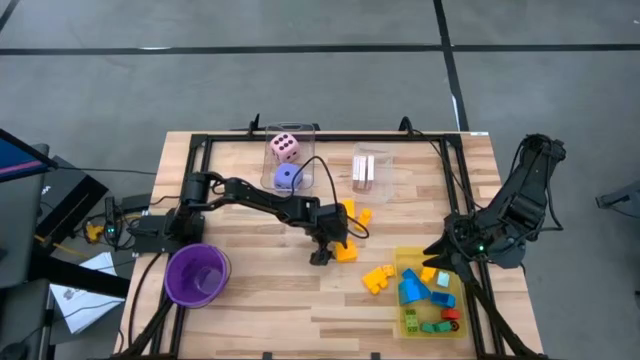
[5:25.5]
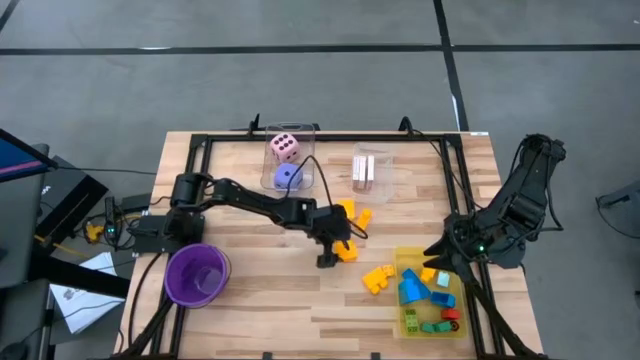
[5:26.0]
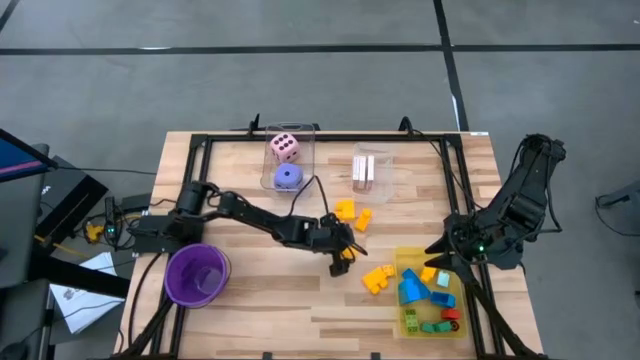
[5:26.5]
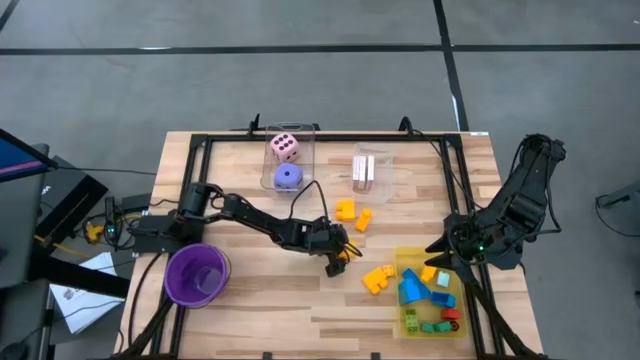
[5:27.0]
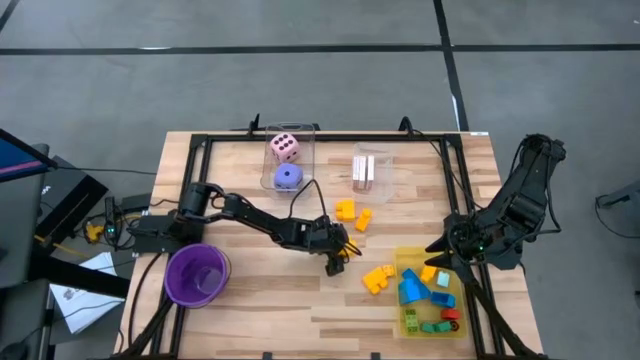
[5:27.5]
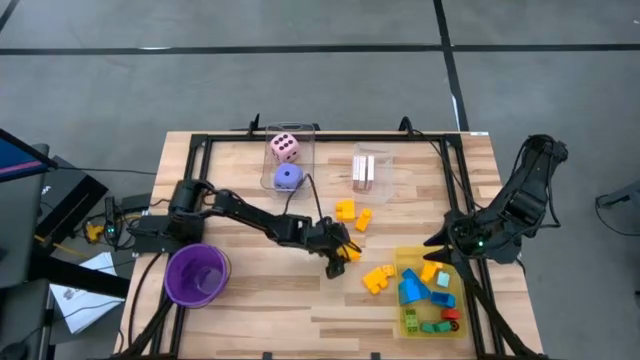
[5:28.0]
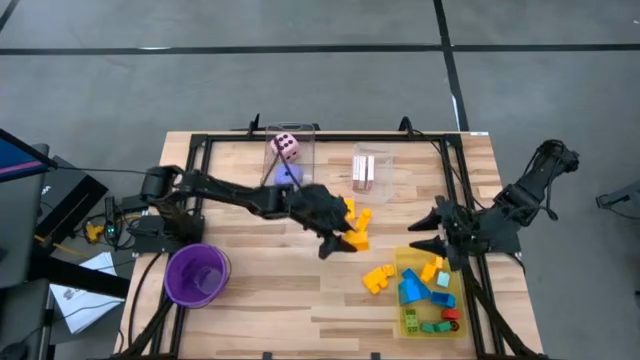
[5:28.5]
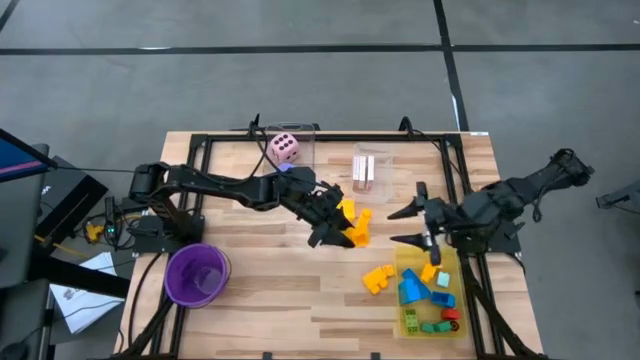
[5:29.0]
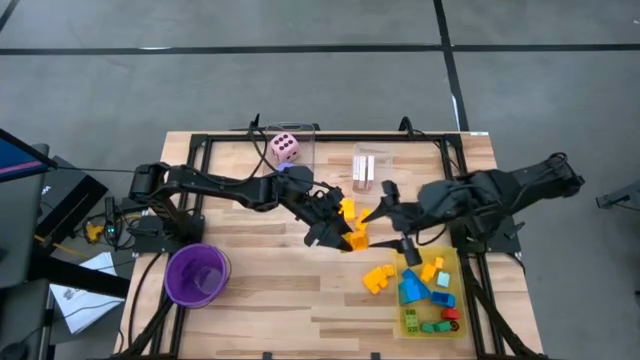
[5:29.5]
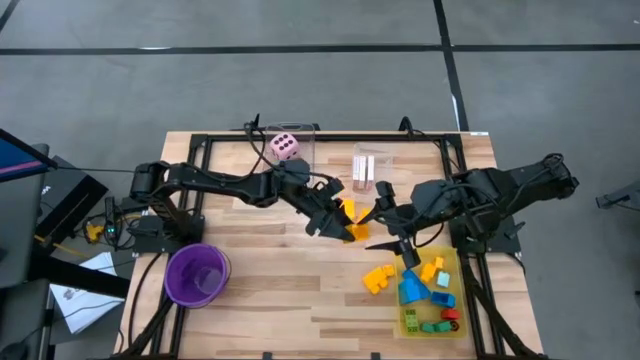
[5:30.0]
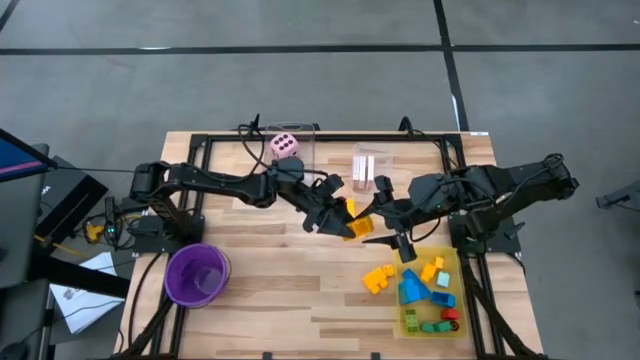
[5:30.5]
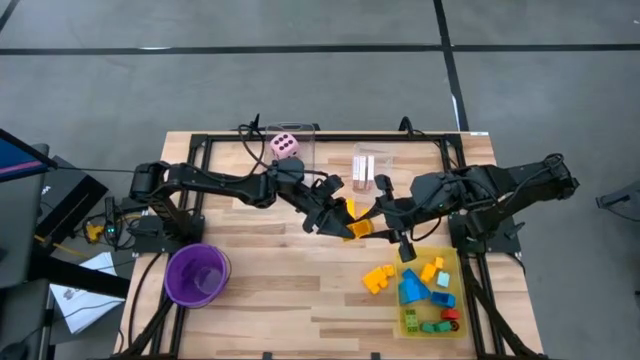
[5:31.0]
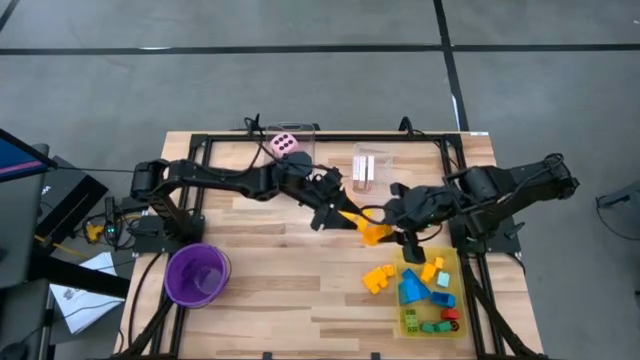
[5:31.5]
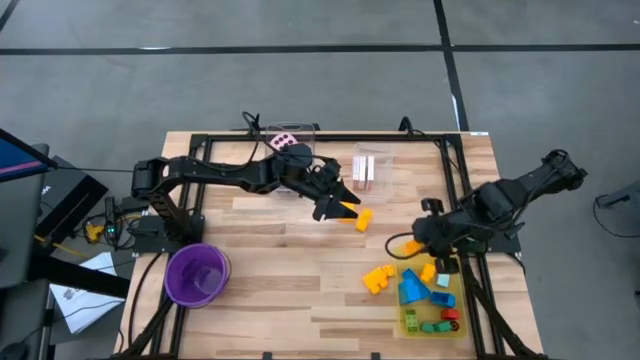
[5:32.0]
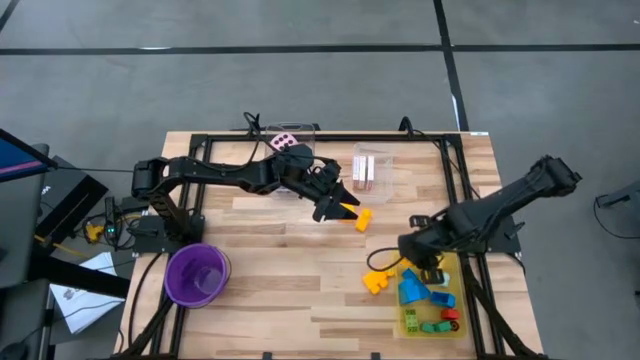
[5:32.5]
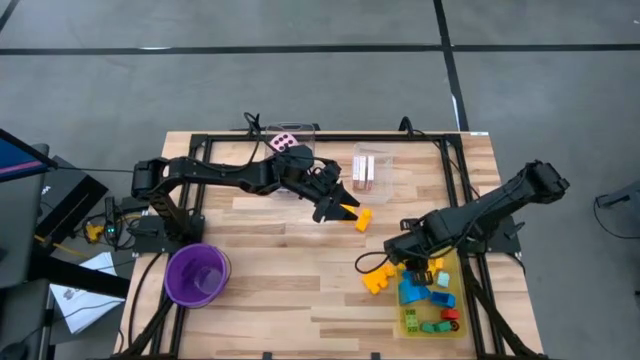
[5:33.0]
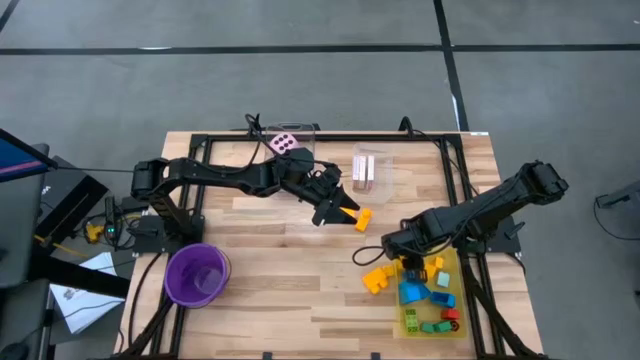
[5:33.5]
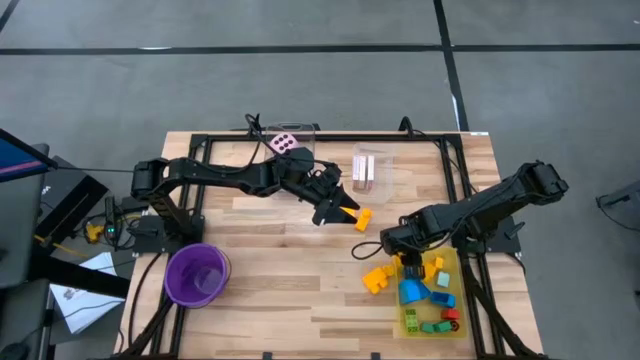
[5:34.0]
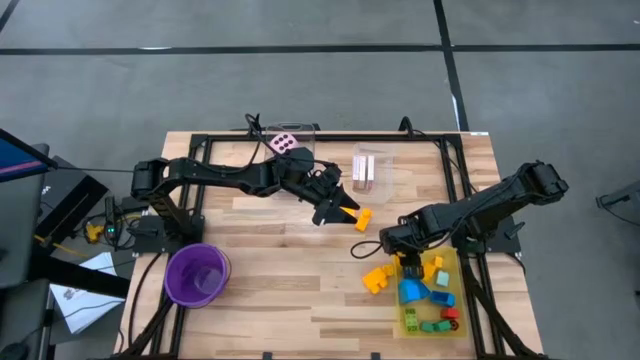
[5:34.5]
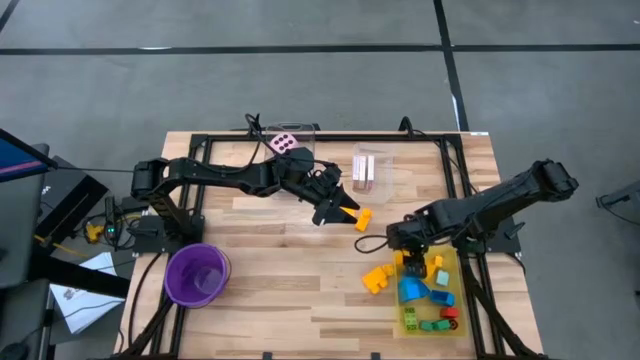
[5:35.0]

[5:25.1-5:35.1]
Task: Pick & Place Toys
Put the yellow game piece into the bin

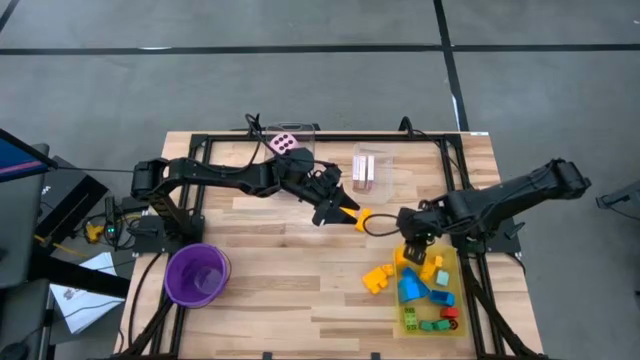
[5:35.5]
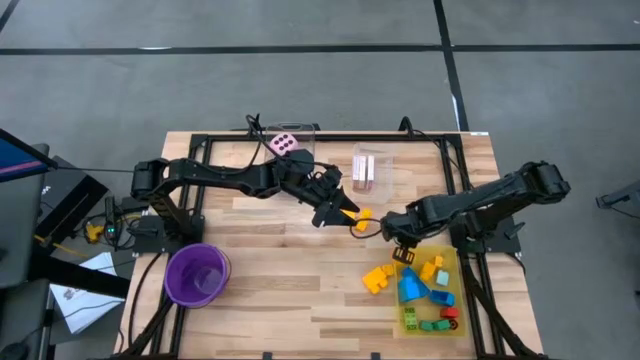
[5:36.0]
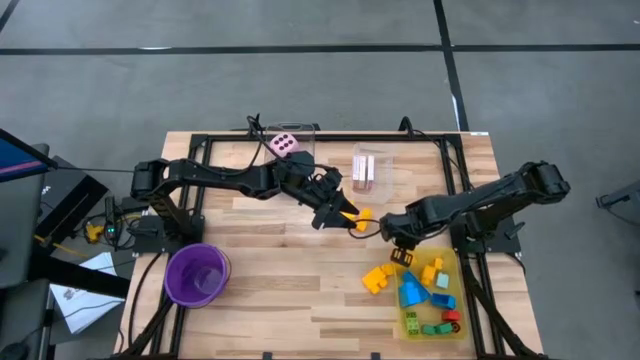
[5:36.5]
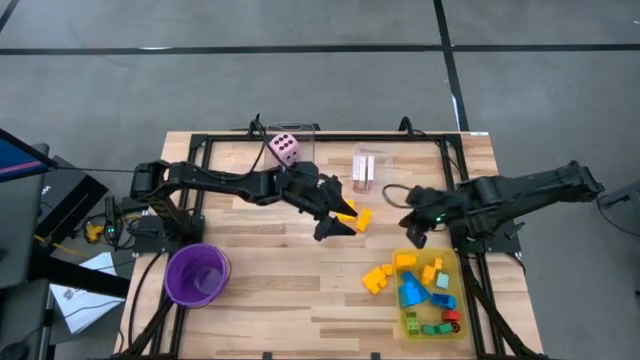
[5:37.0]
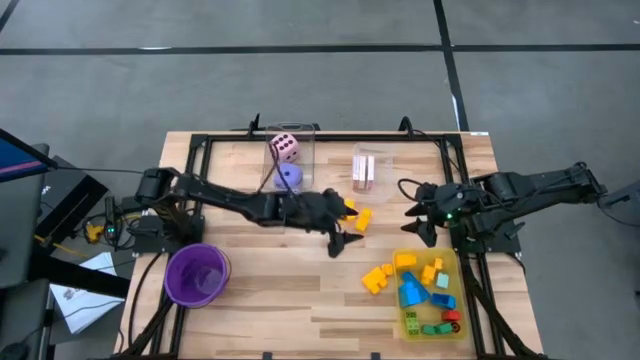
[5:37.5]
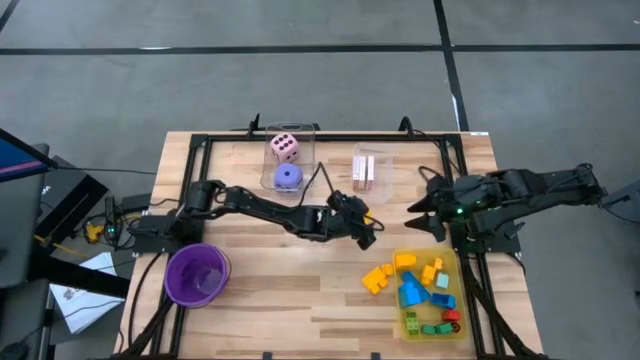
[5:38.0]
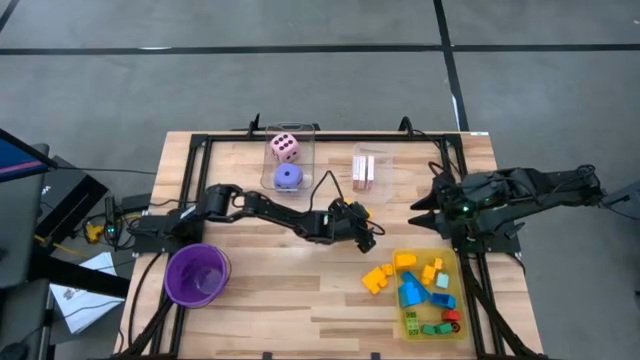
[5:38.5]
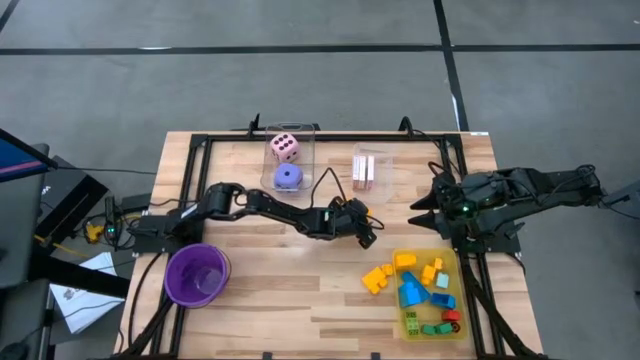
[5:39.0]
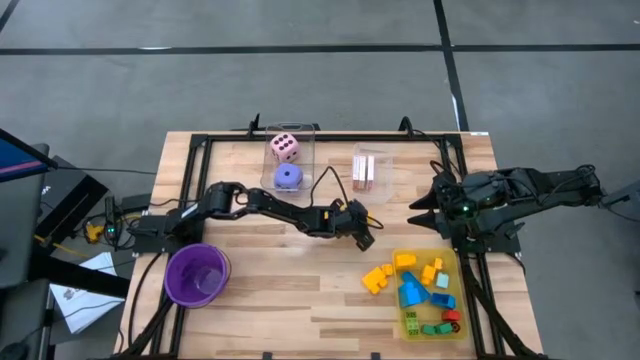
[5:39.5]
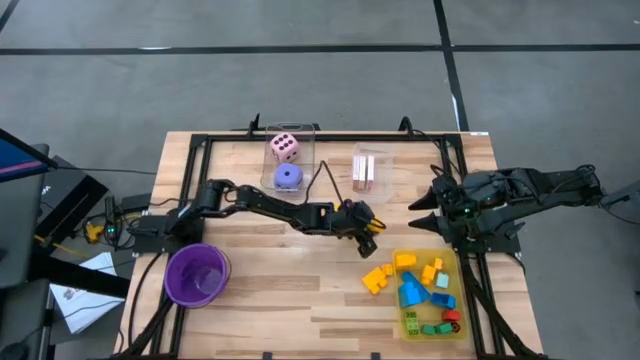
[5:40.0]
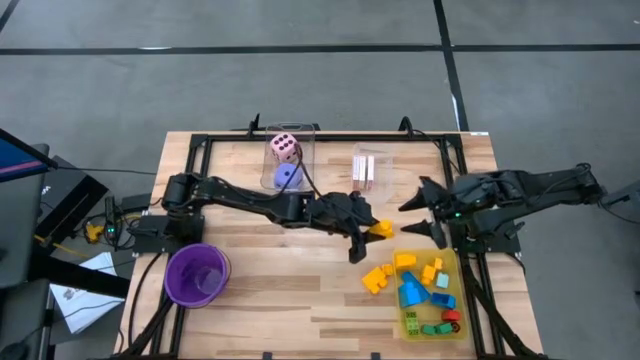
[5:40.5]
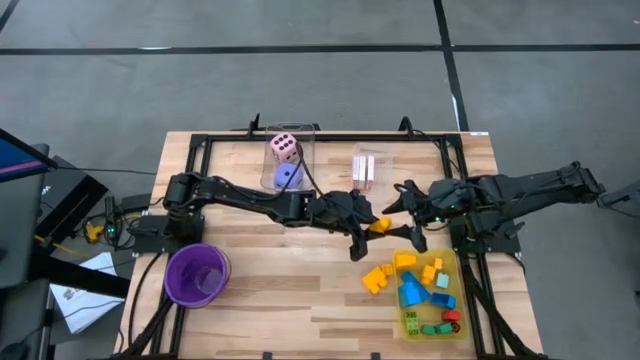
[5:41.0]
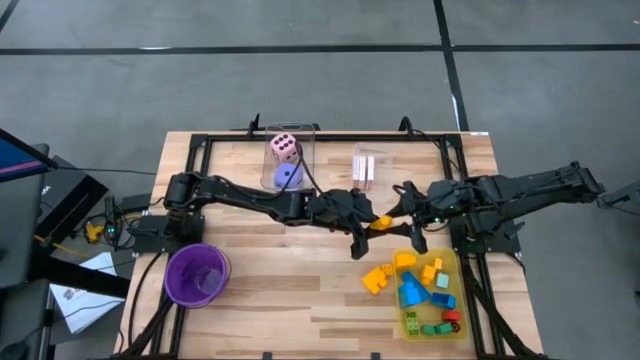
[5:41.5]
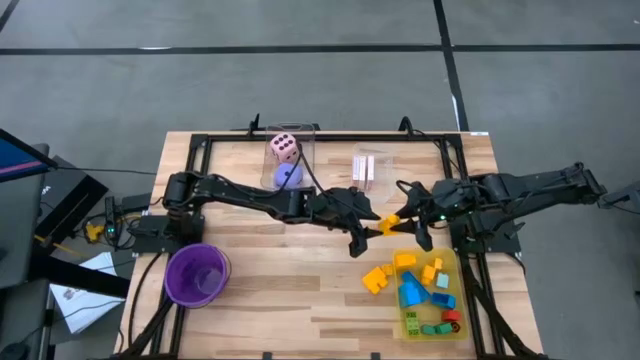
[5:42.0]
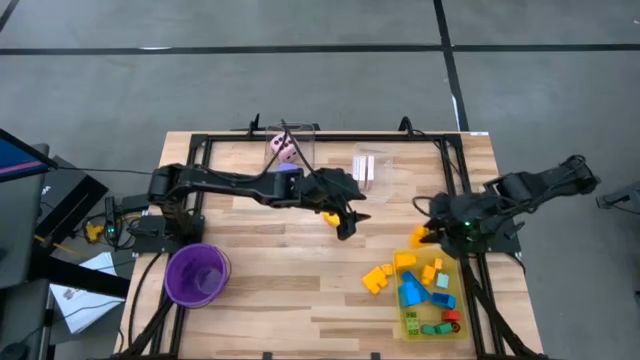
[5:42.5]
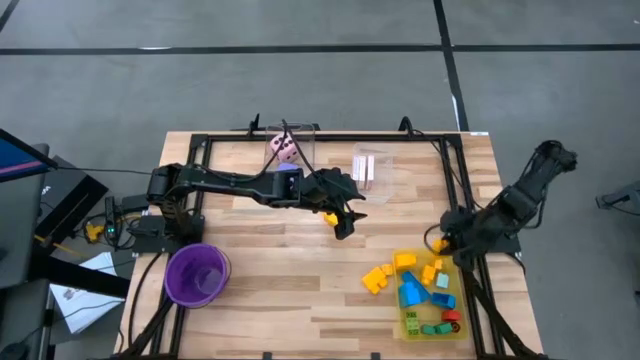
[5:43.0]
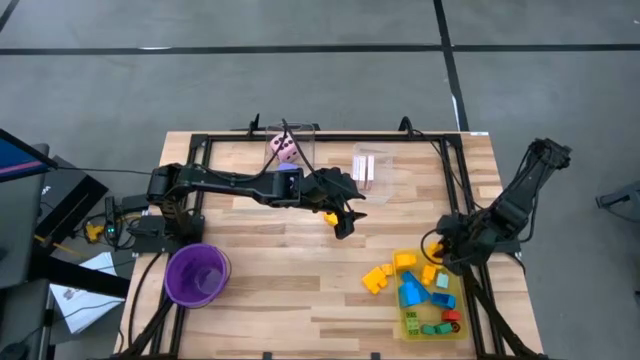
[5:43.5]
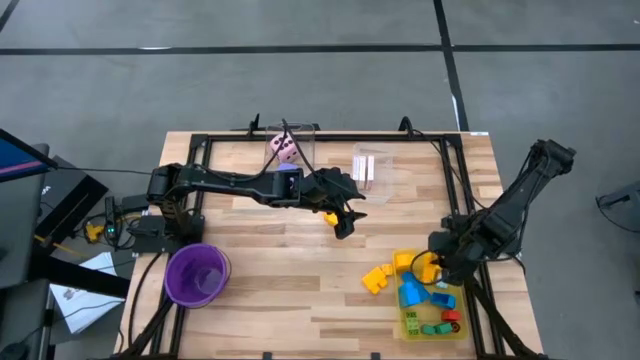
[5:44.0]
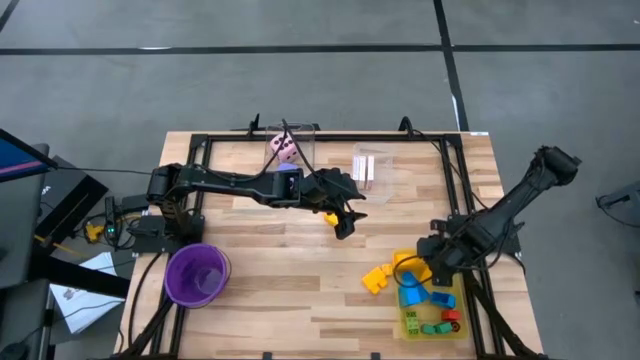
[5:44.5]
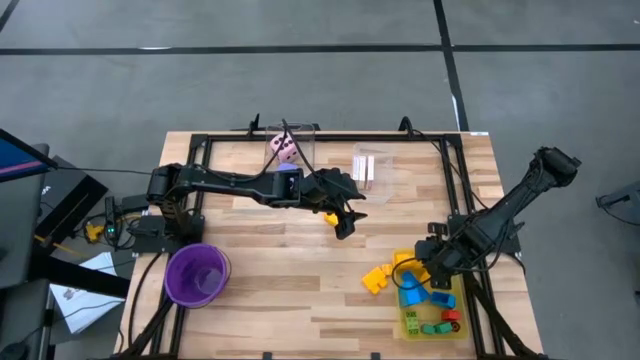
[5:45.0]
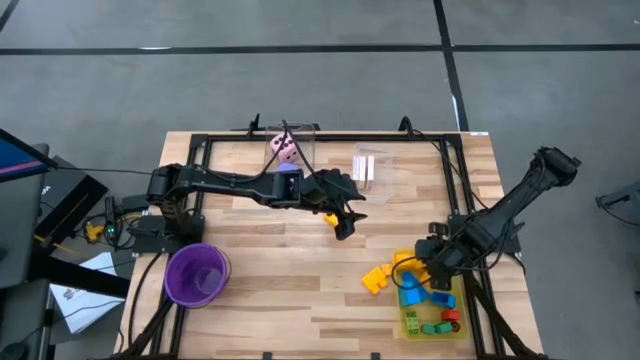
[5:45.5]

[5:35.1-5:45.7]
Put the yellow game piece into the bin

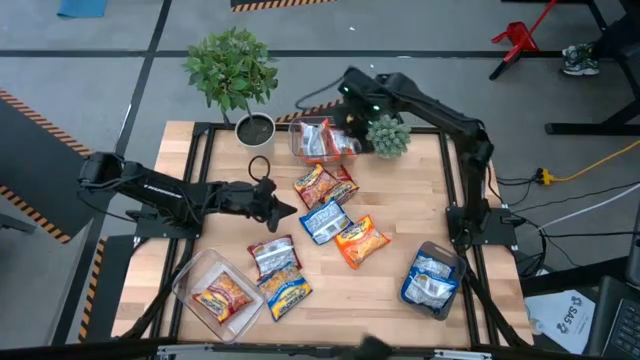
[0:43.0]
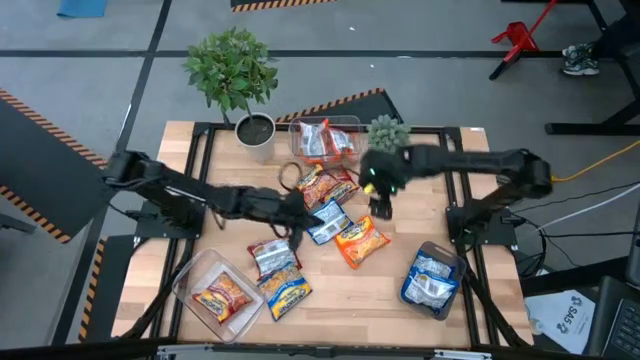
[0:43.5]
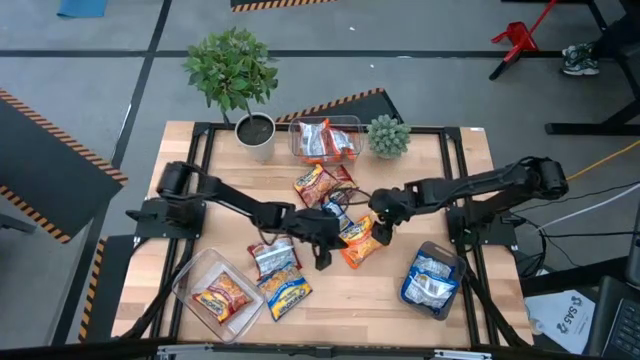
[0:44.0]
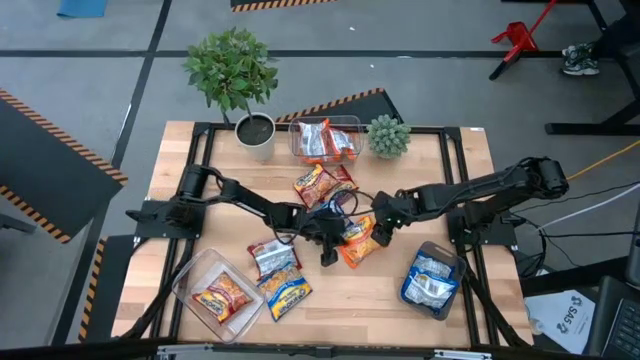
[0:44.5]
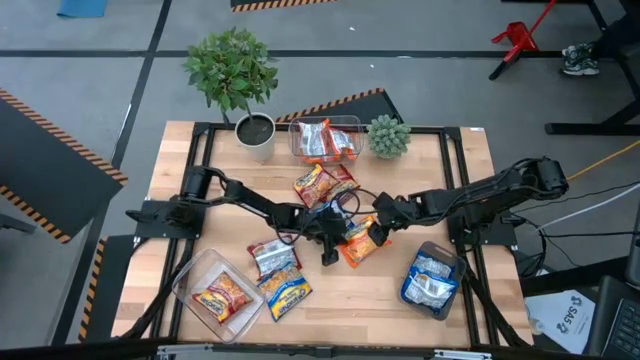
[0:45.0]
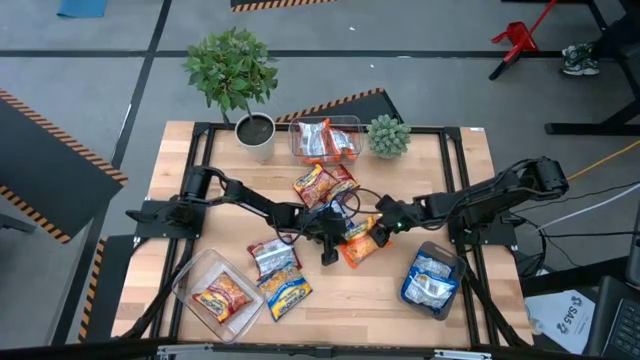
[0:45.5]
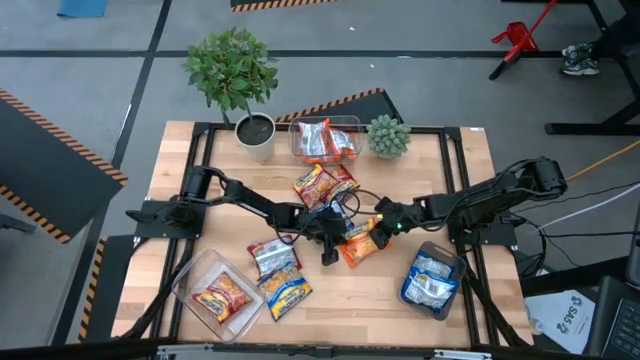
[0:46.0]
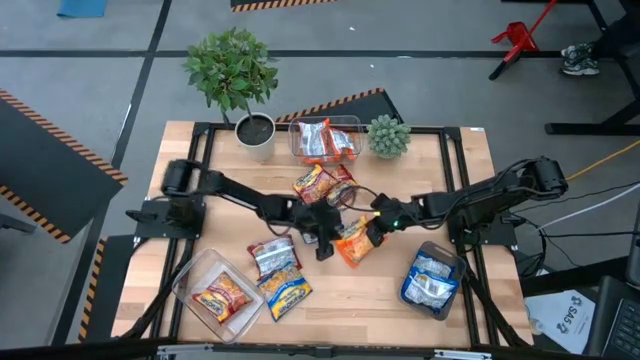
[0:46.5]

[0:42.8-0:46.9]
Task: Sort Maruchan noodles
Put the orange noodle pack into the top transparent bin
